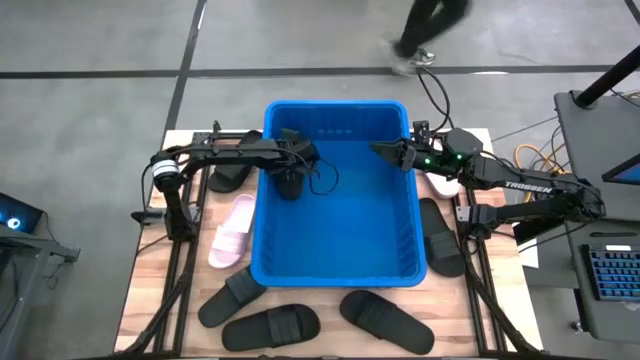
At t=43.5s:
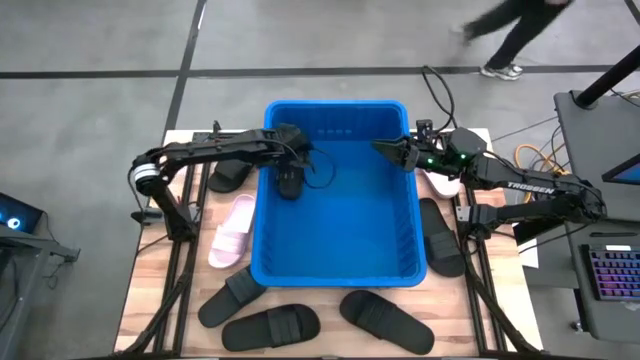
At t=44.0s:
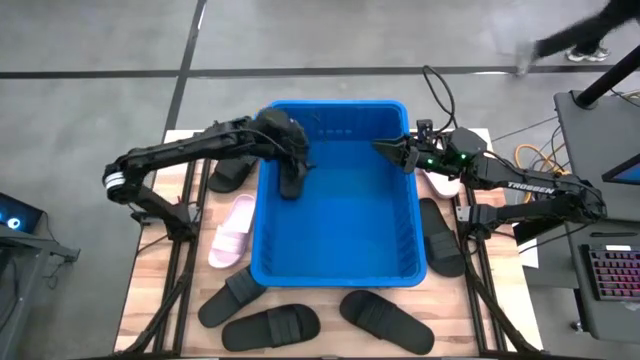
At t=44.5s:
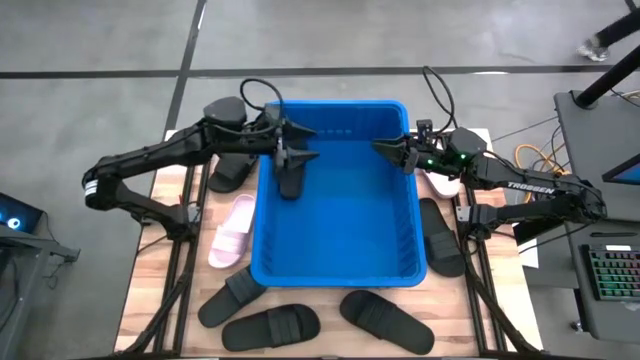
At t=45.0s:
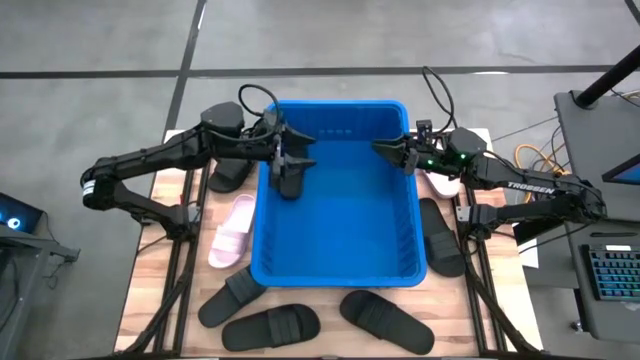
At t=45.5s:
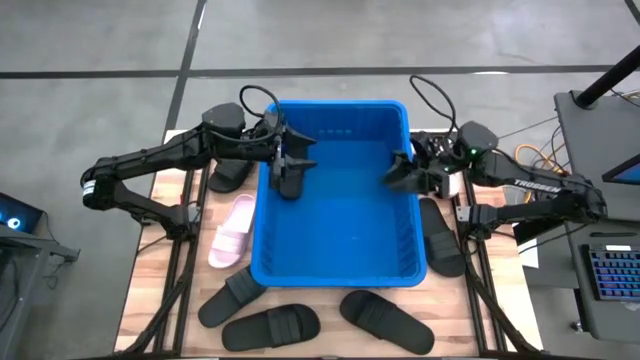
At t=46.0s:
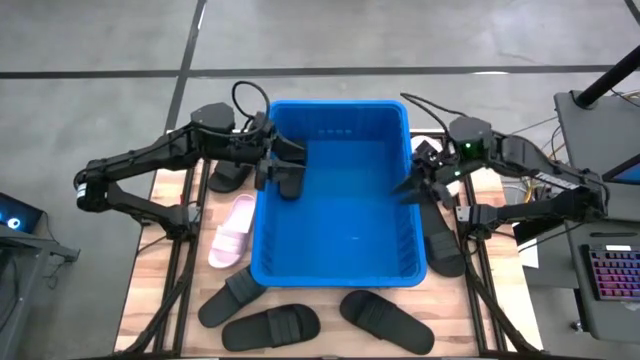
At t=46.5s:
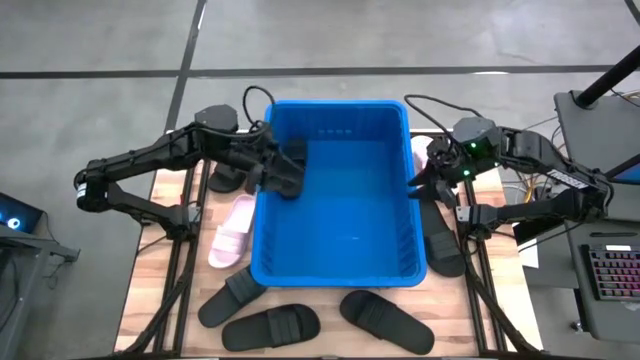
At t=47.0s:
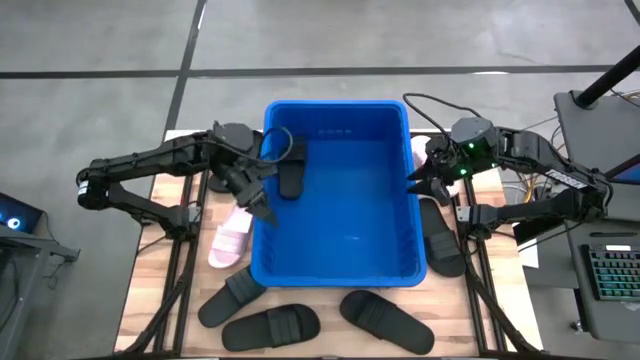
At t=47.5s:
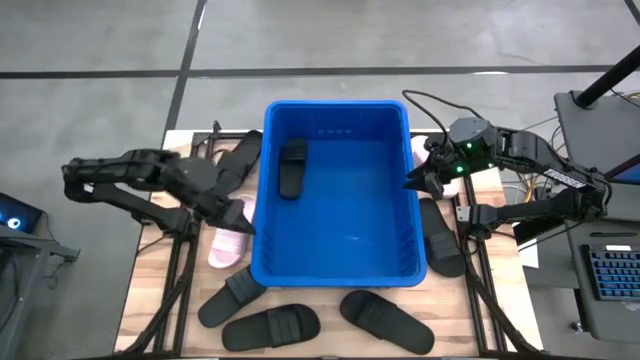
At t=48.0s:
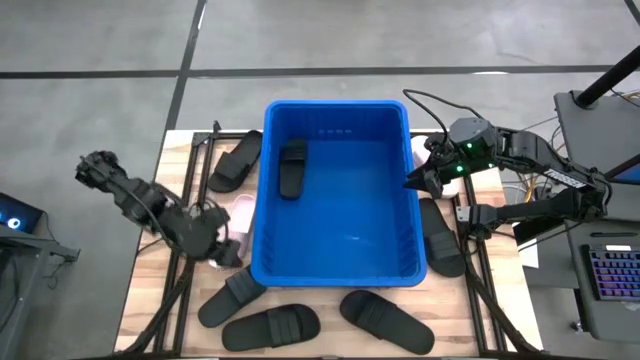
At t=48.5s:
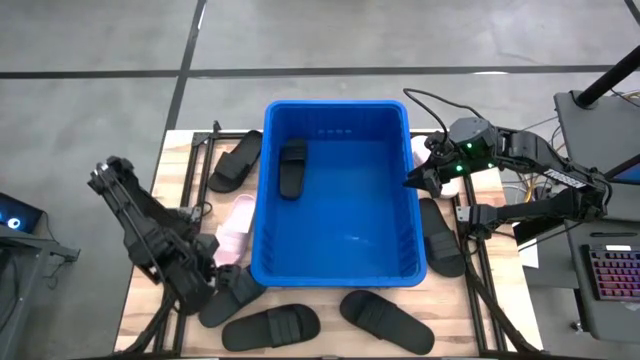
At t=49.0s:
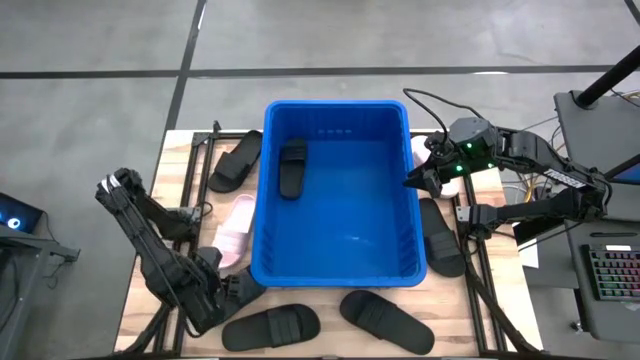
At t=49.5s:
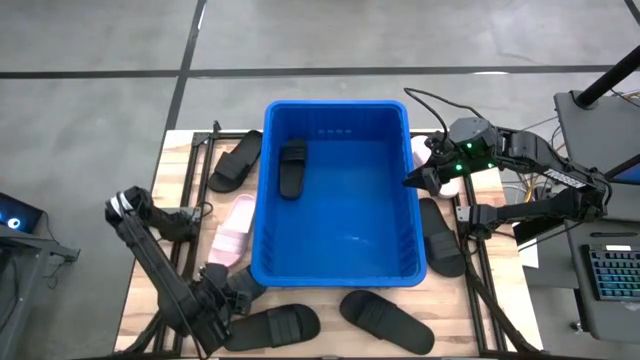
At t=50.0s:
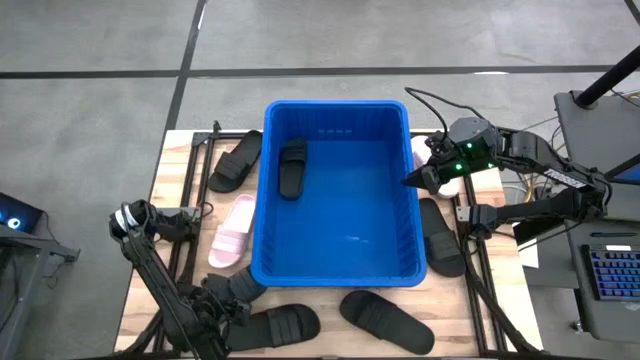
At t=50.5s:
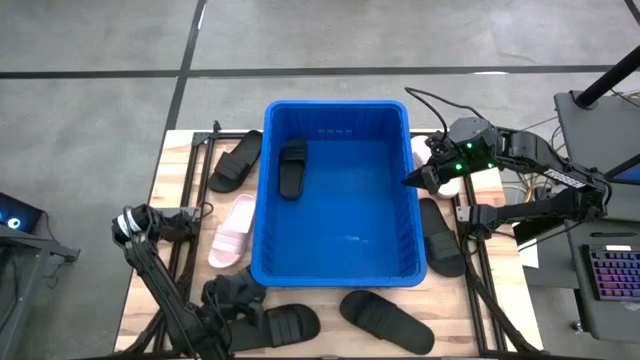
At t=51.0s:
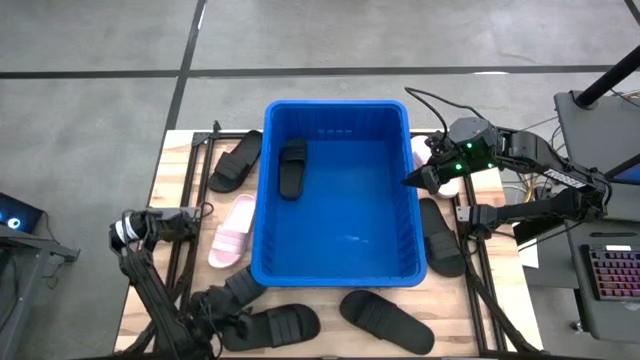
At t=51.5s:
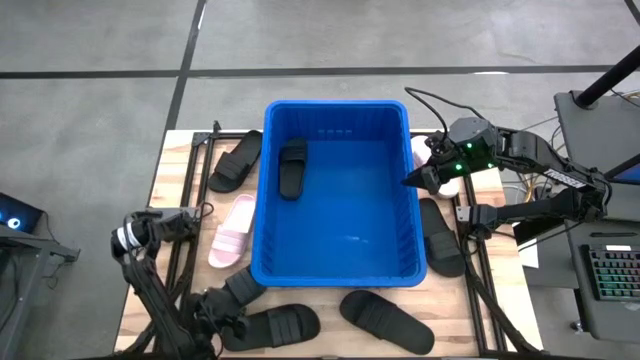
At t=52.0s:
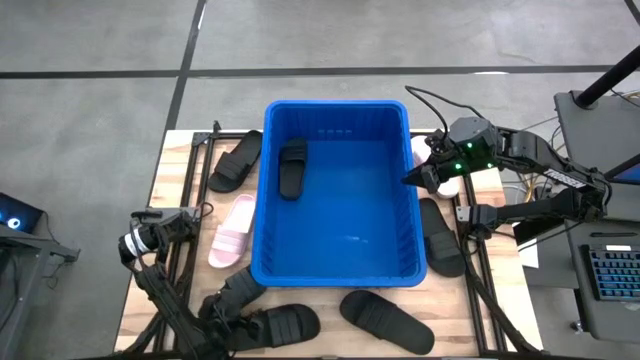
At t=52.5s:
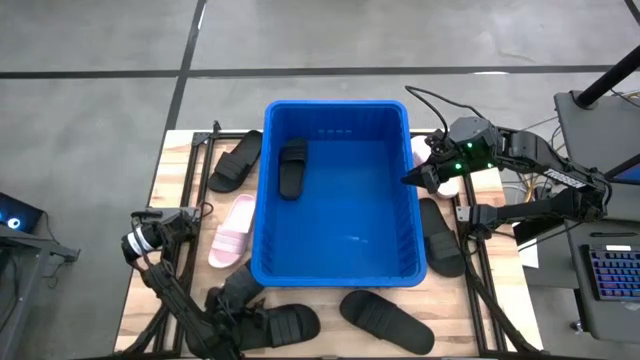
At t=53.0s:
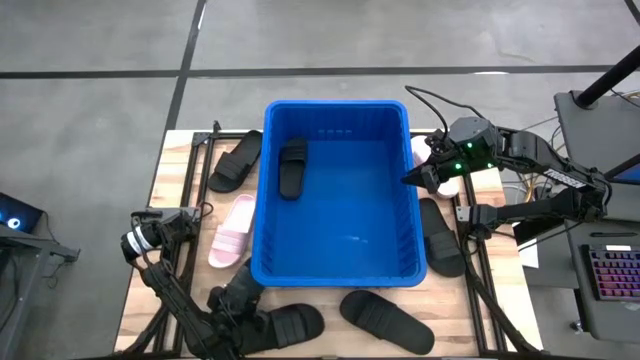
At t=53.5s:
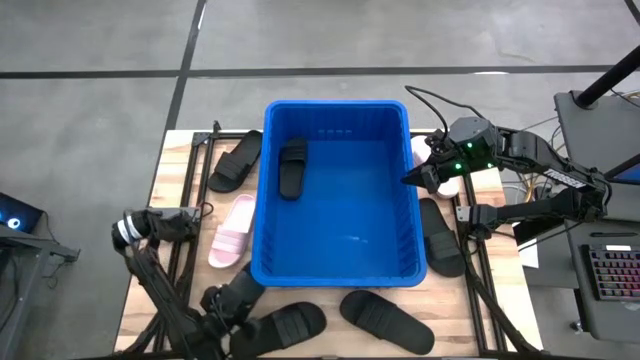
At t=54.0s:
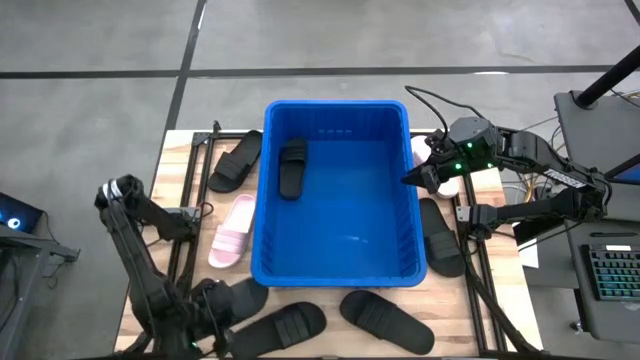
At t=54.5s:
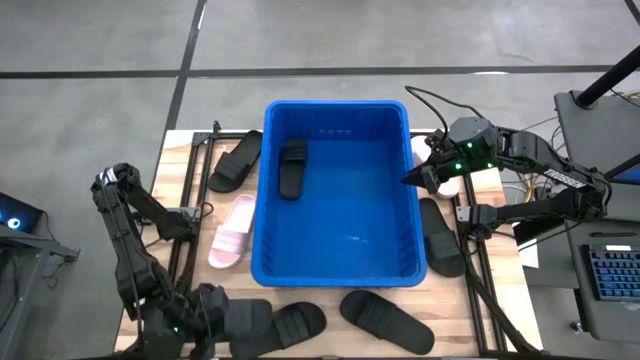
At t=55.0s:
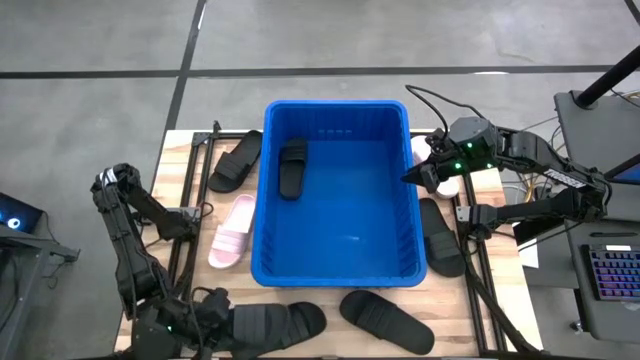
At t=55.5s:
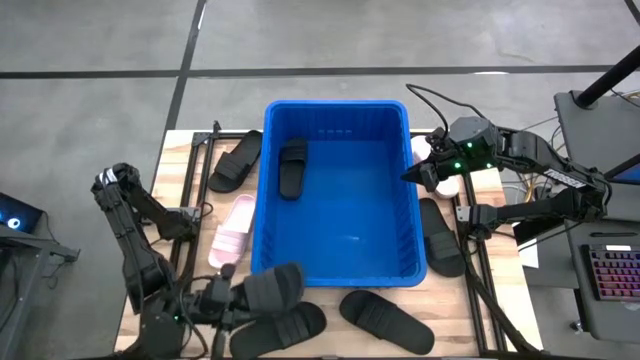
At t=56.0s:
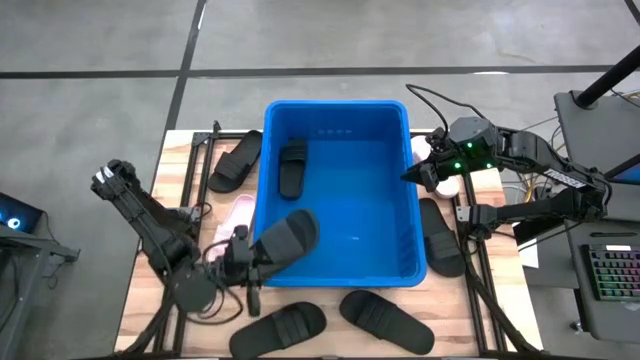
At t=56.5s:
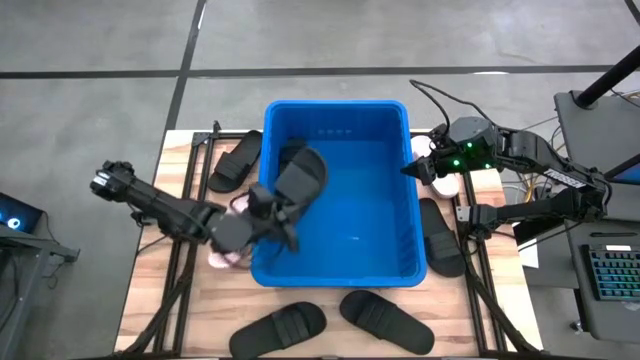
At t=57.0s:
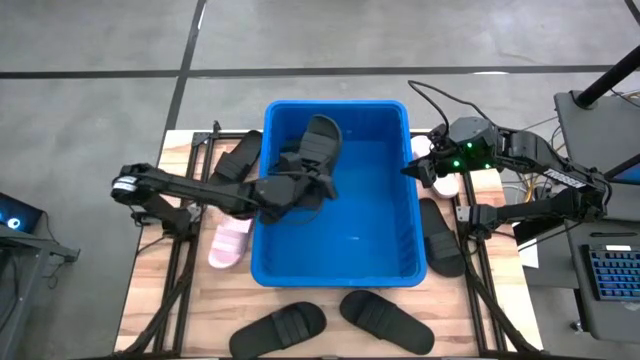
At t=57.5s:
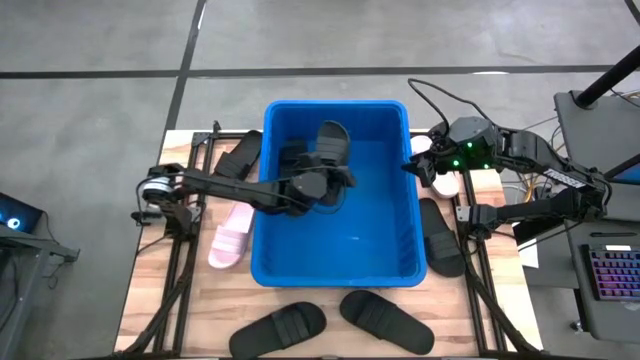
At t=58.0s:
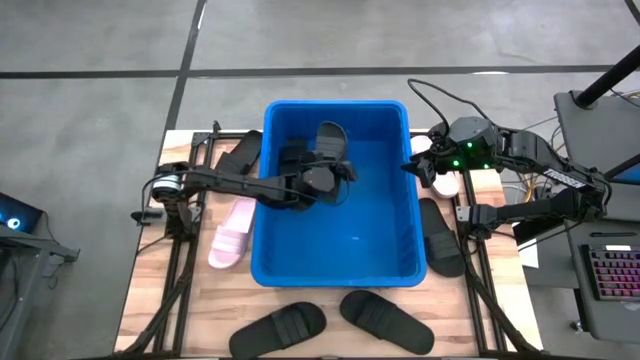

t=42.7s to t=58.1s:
Task: Pick and place slides into bin
Put the black slide into the blue bin

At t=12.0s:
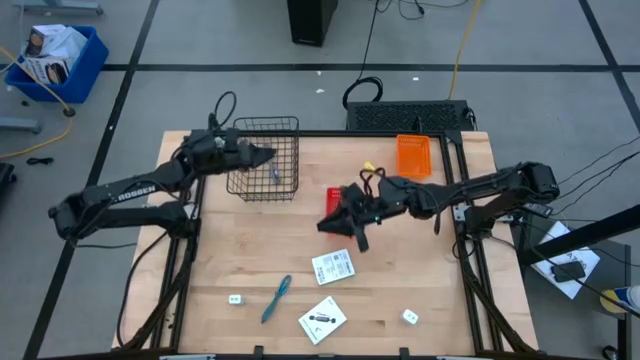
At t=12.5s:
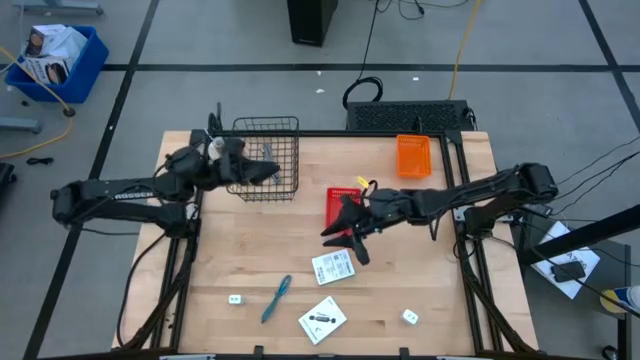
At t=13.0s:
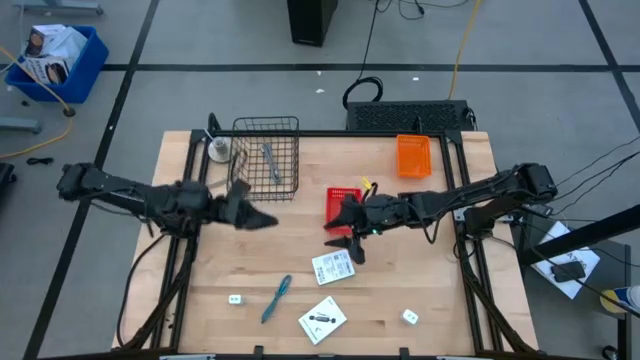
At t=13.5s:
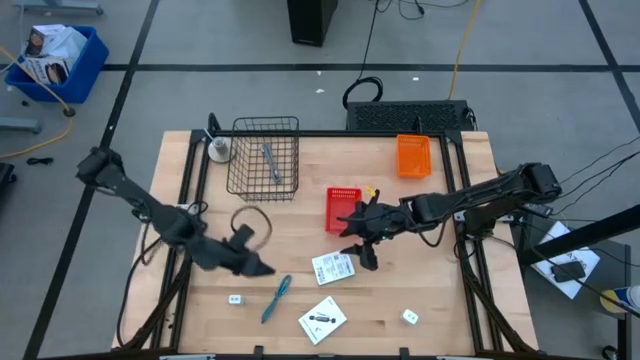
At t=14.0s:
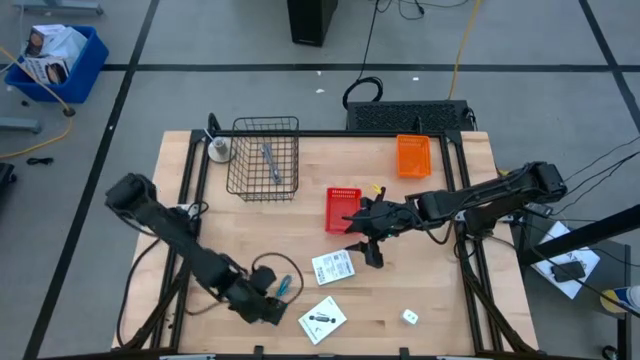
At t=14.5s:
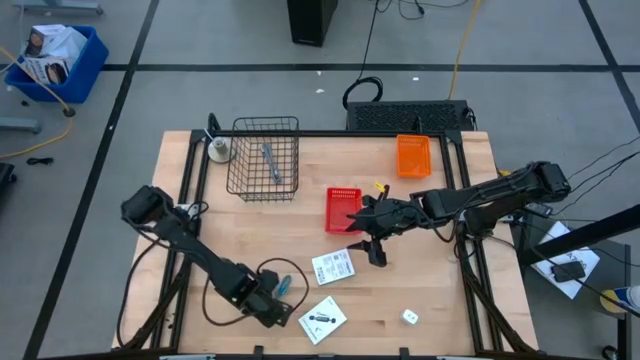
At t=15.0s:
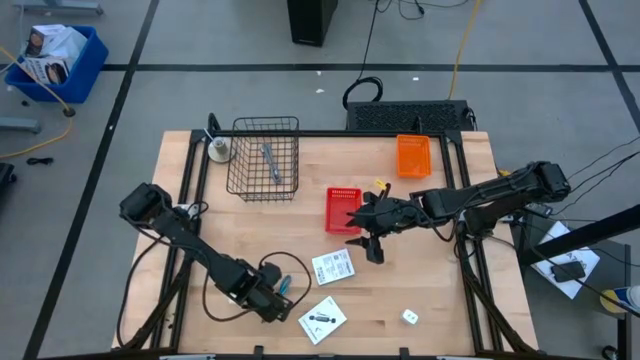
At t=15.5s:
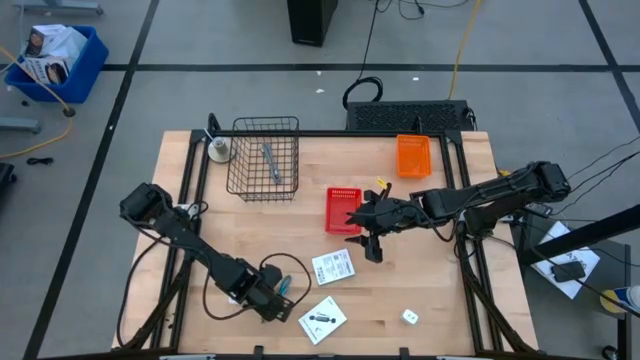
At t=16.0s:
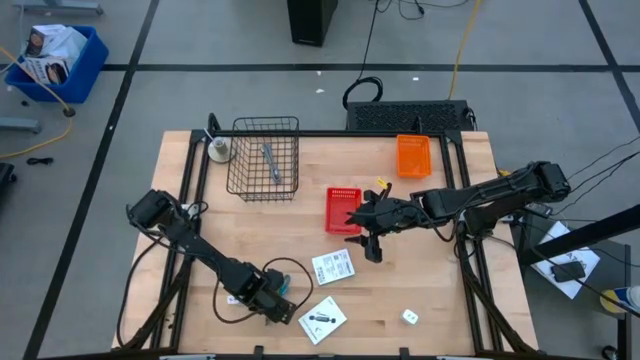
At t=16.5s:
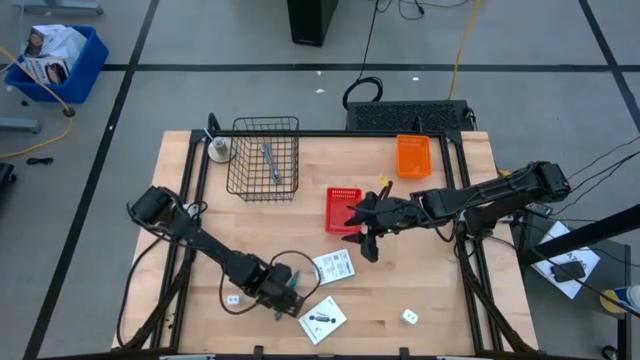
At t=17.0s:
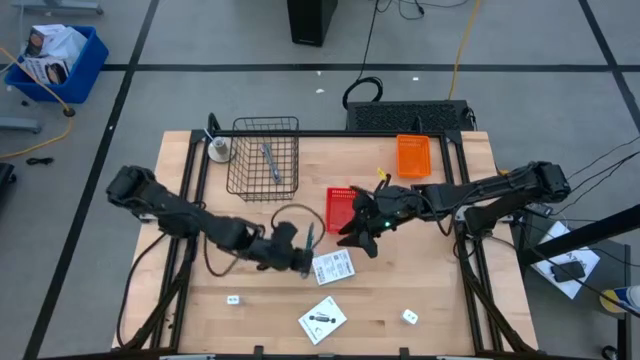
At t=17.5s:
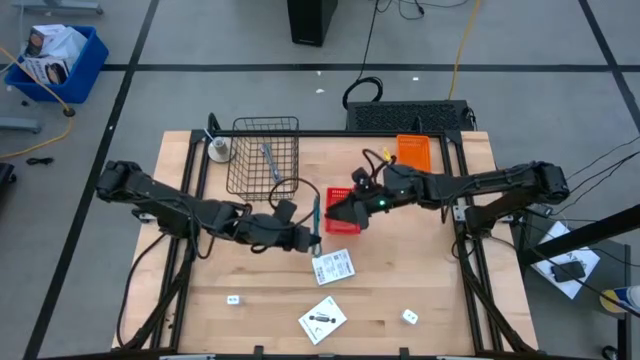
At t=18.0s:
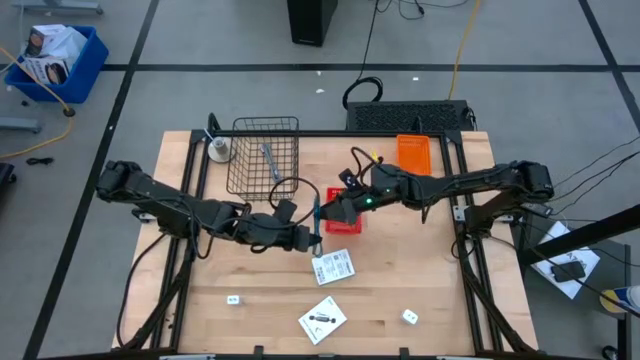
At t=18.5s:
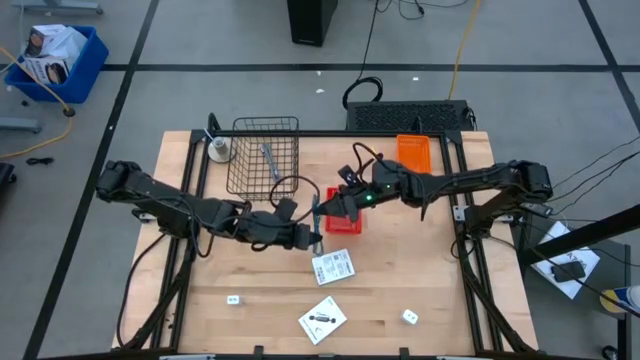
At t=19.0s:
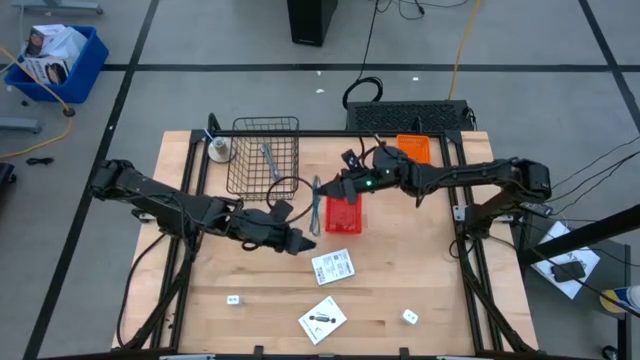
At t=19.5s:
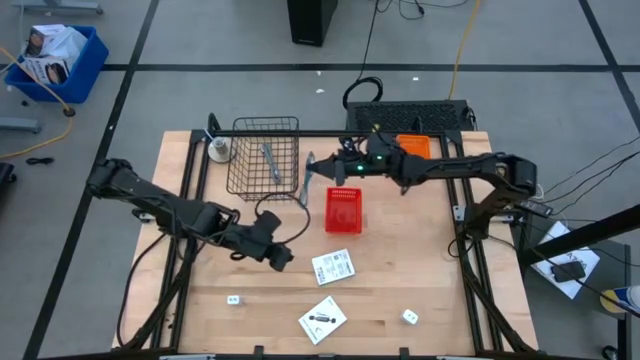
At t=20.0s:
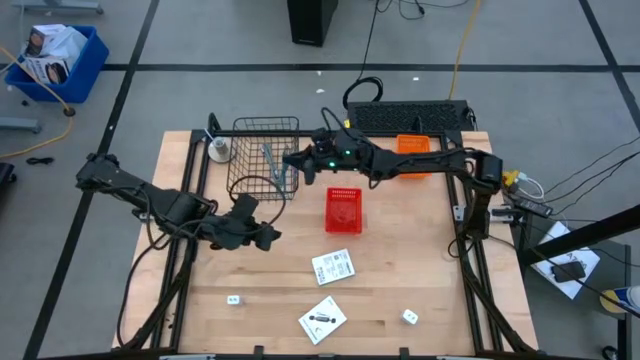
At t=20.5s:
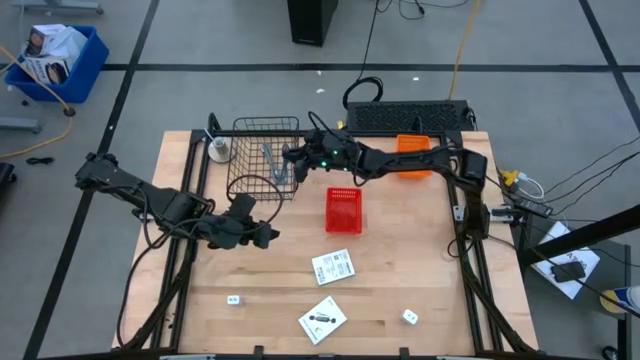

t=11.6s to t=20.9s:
Task: Pick and place items into bin
Put the blue charger cable into the wire basket
